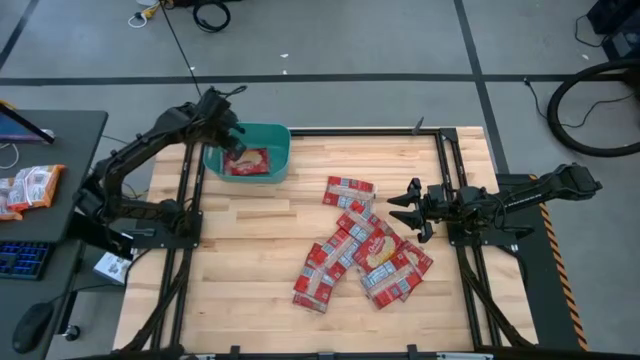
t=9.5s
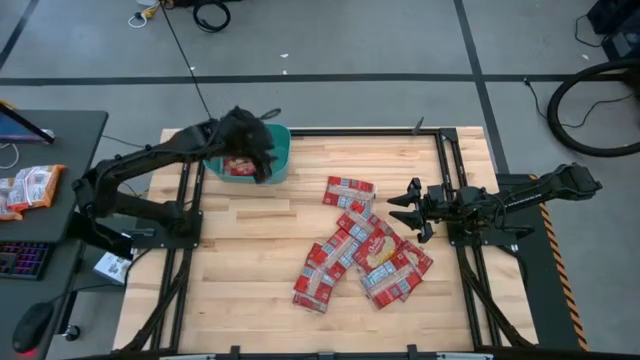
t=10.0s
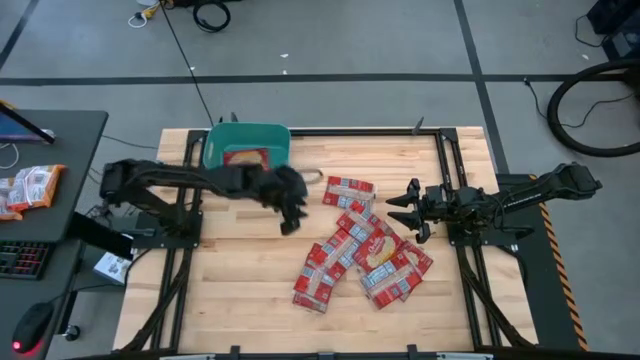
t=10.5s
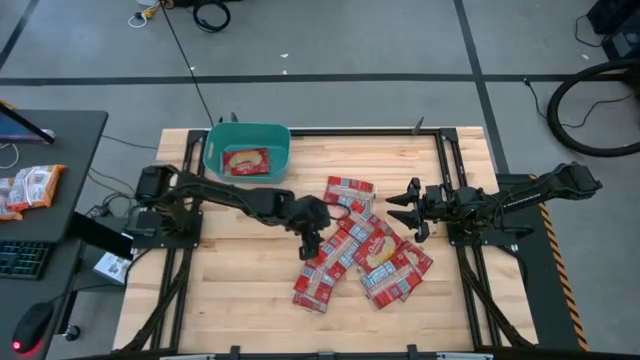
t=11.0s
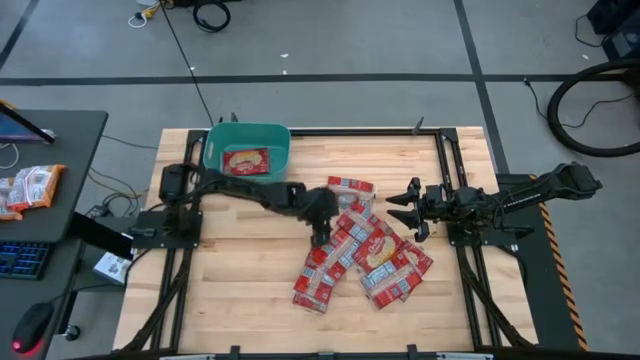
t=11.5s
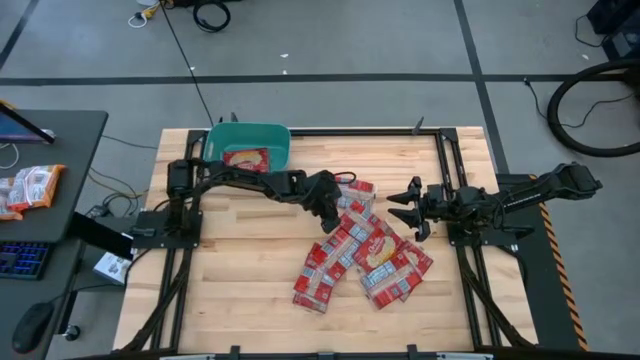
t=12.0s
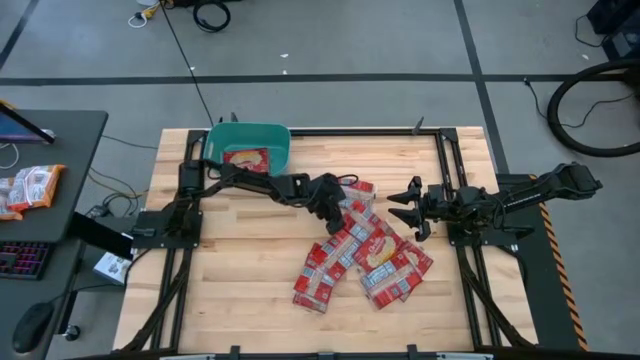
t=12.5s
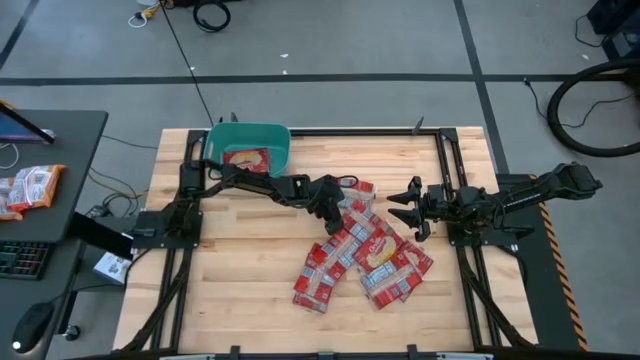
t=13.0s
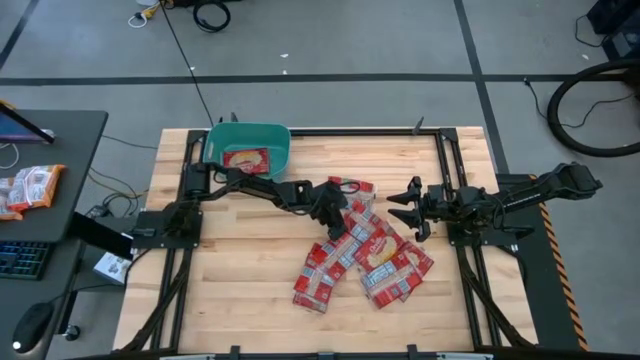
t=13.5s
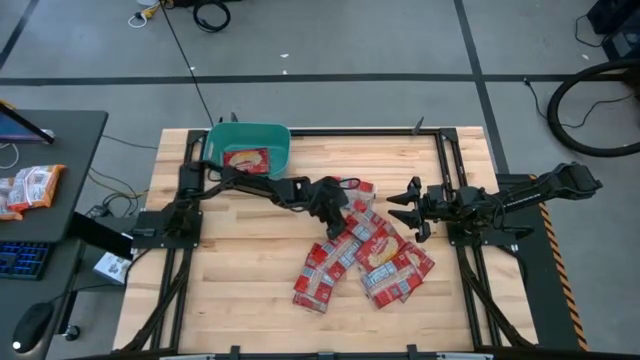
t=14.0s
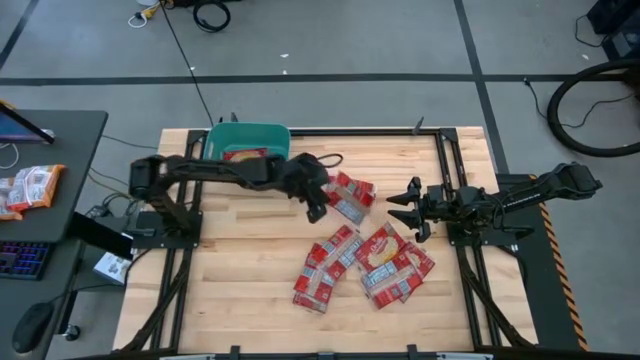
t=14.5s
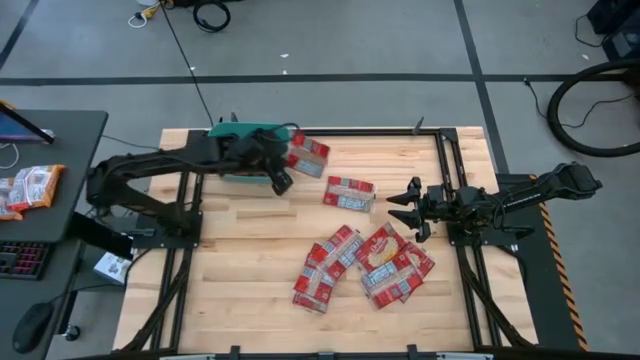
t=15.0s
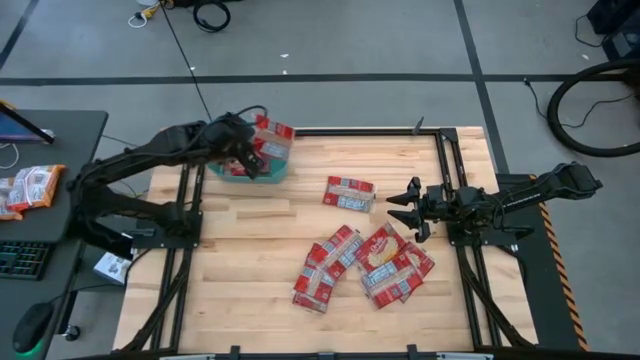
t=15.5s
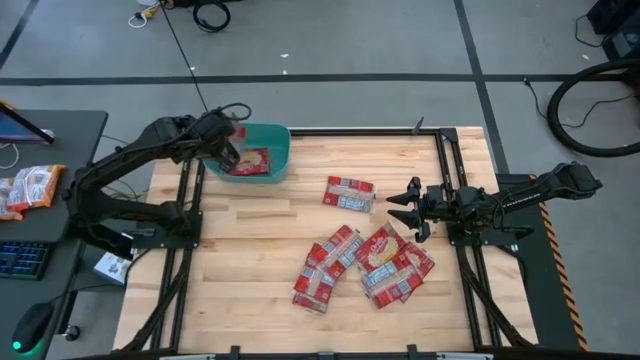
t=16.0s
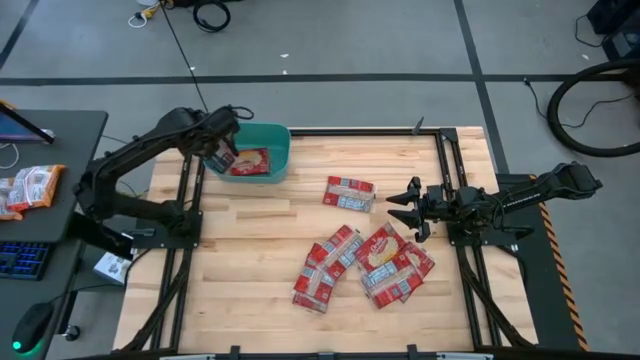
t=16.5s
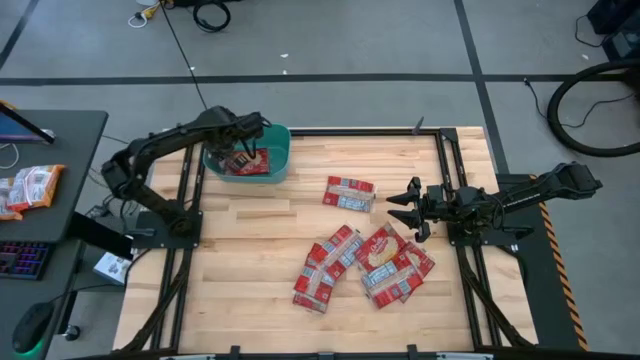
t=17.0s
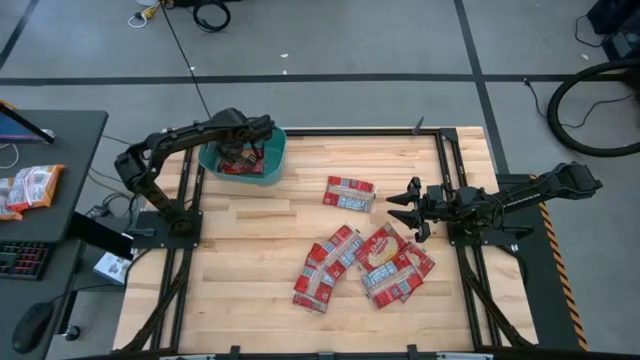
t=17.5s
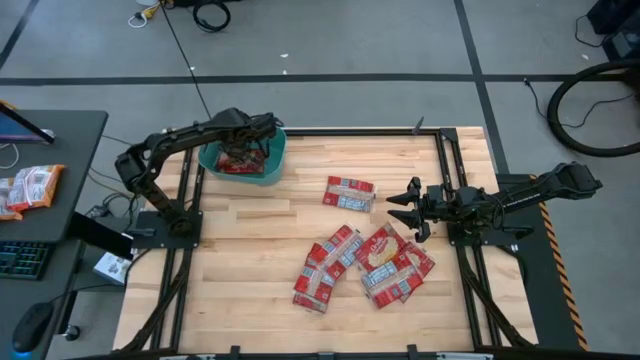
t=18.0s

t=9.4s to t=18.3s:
Task: Sort popcorn bags into baskets
Put the popcorn sachet into the bin

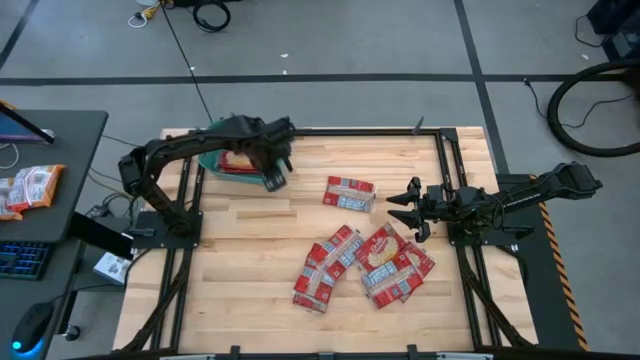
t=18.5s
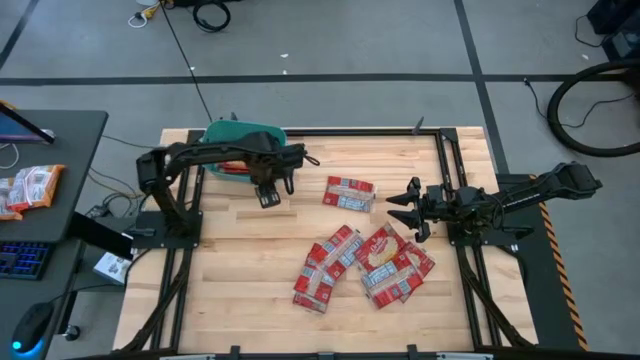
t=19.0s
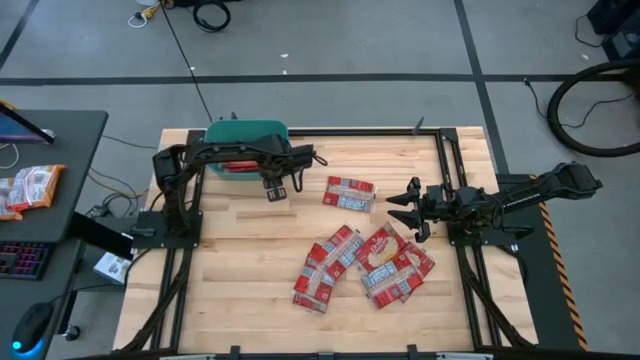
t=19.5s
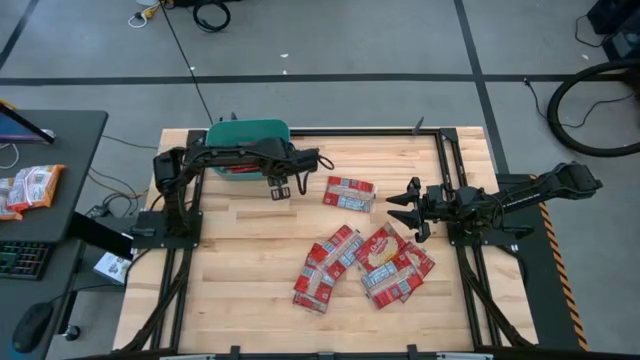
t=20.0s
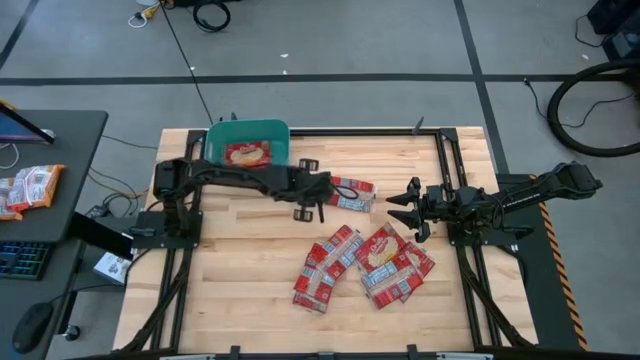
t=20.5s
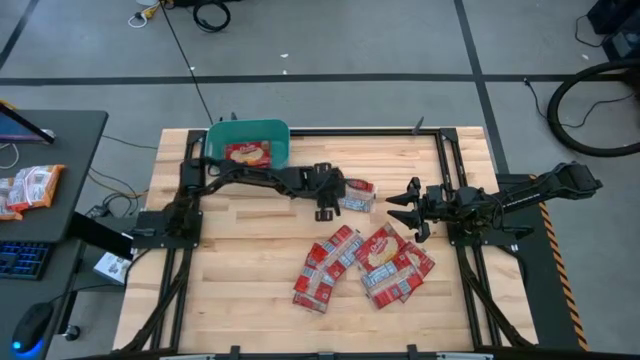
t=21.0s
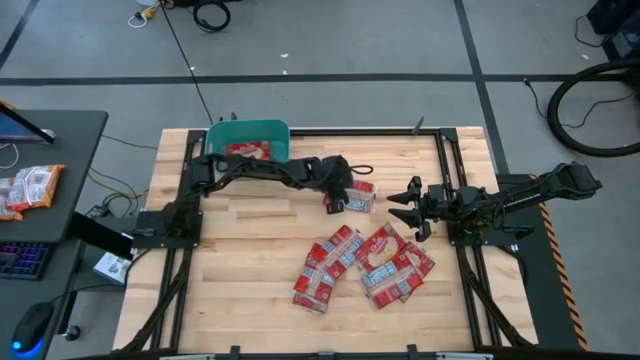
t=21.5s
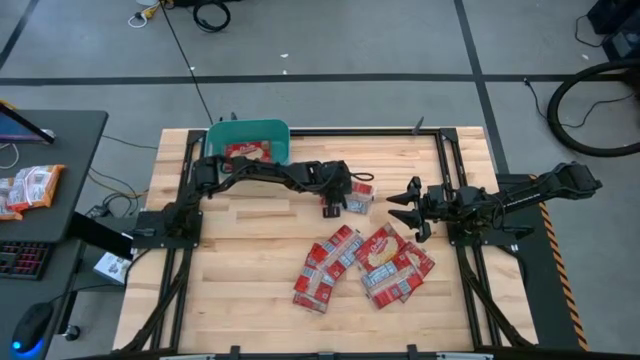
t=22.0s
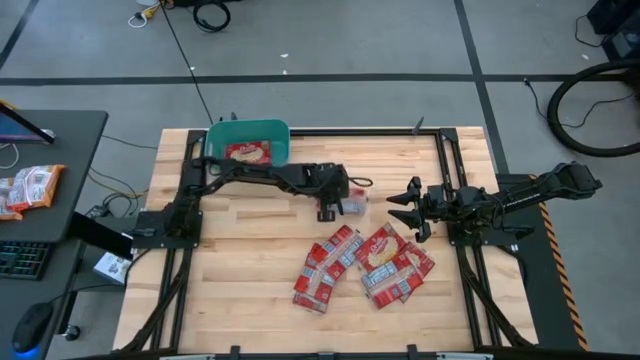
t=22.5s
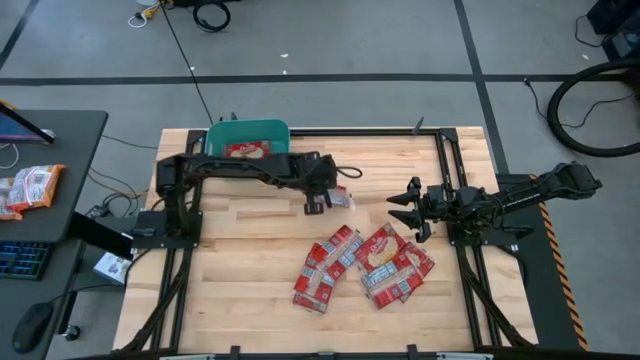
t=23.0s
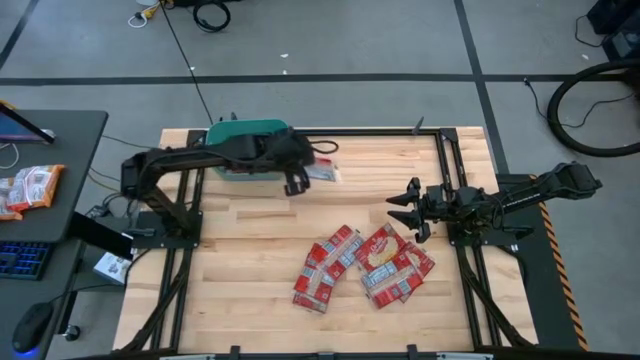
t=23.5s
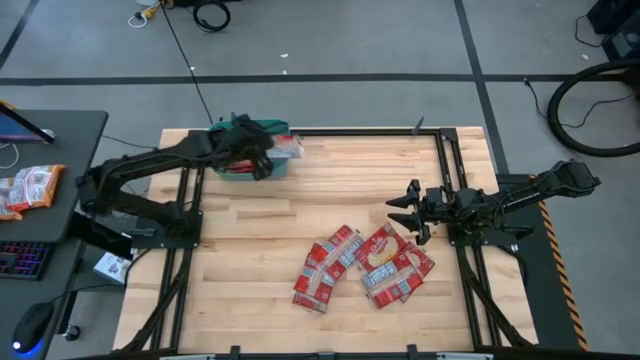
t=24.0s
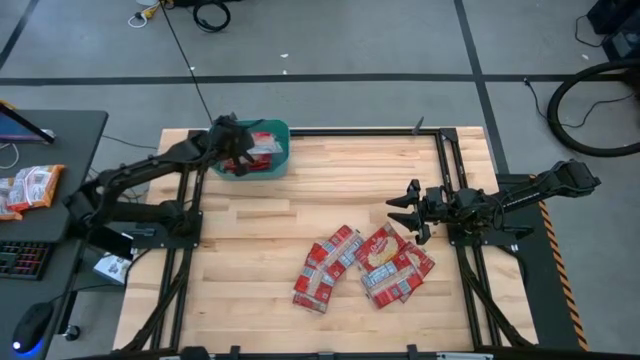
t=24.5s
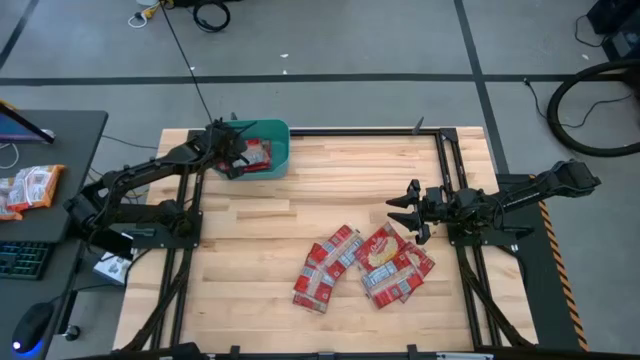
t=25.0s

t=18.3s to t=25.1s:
Put the popcorn sachet into the bin

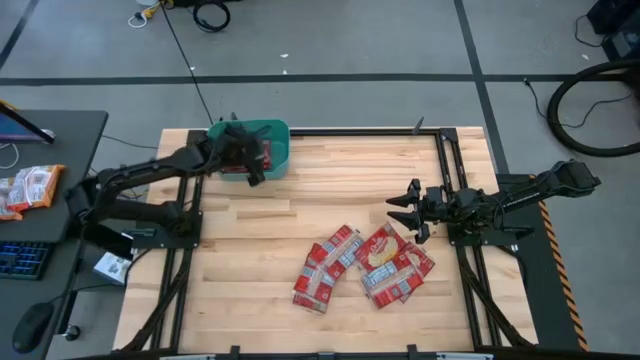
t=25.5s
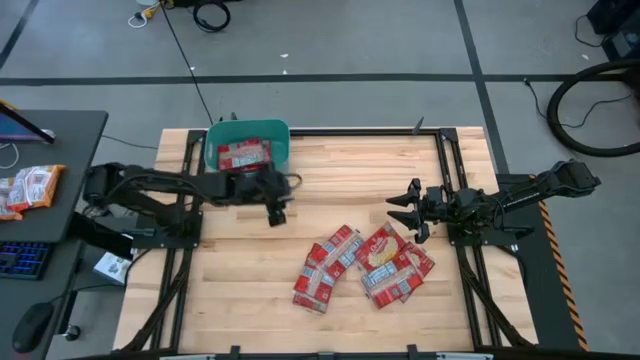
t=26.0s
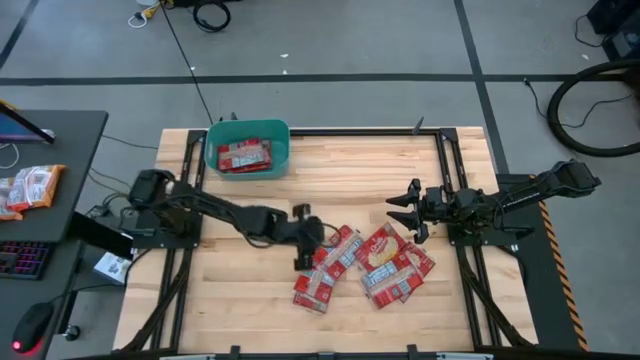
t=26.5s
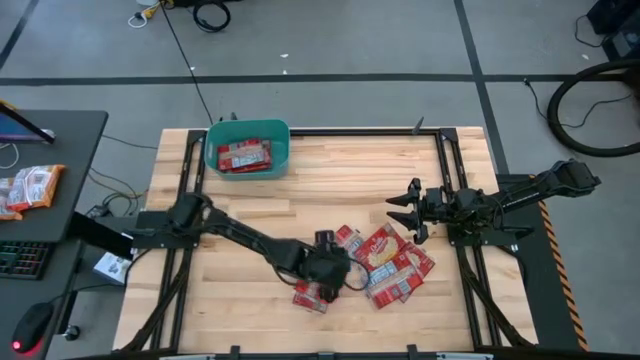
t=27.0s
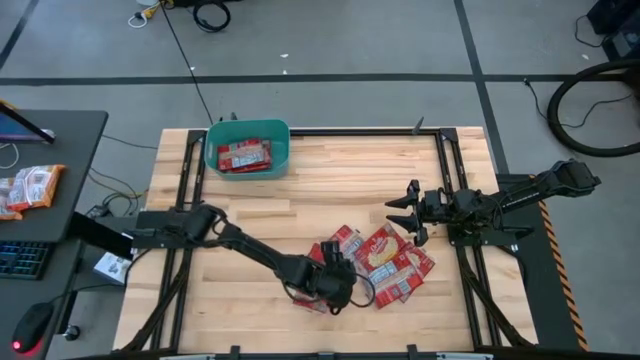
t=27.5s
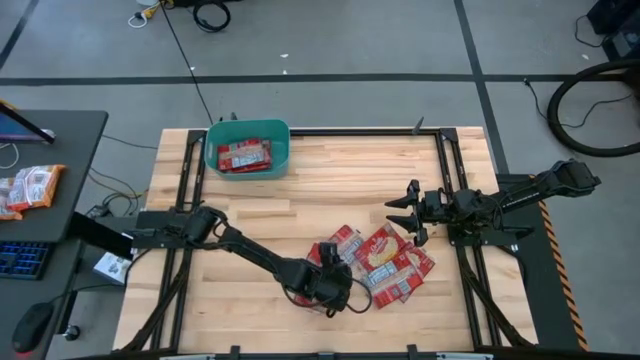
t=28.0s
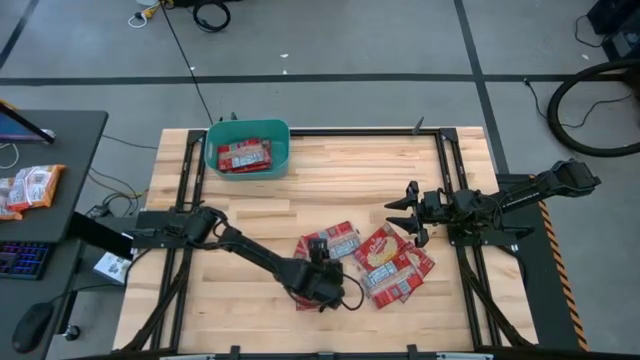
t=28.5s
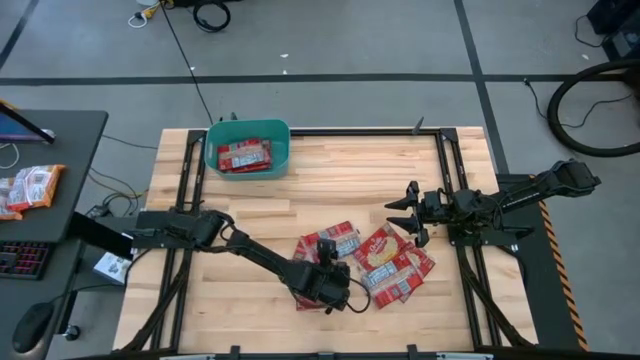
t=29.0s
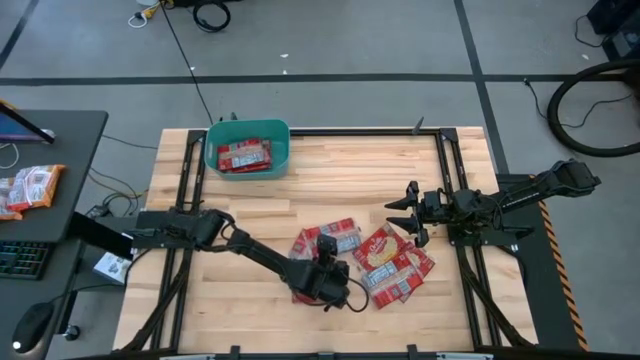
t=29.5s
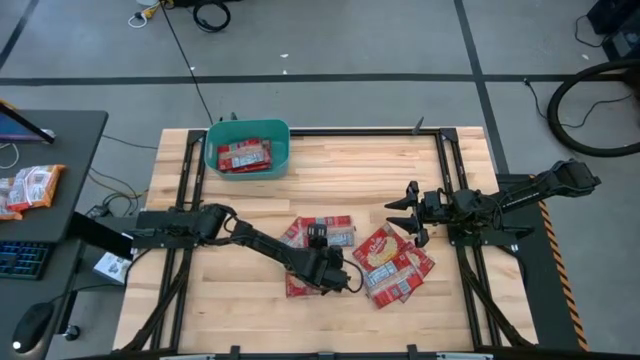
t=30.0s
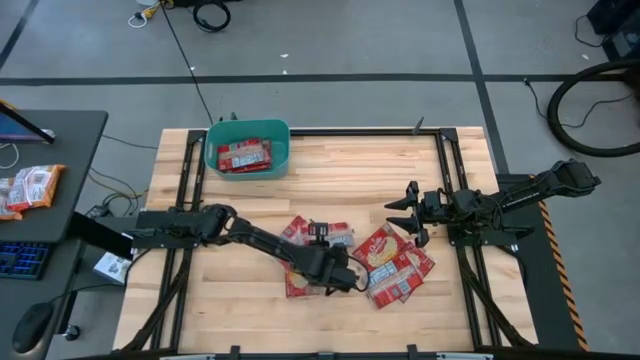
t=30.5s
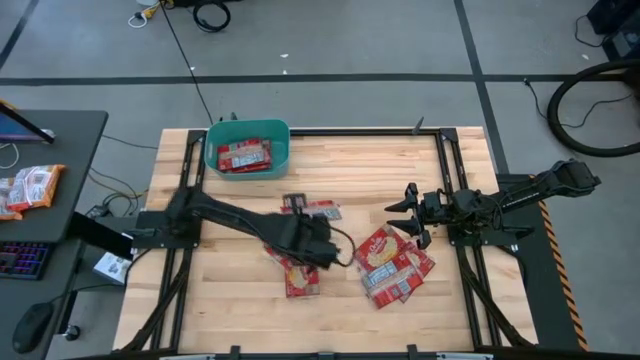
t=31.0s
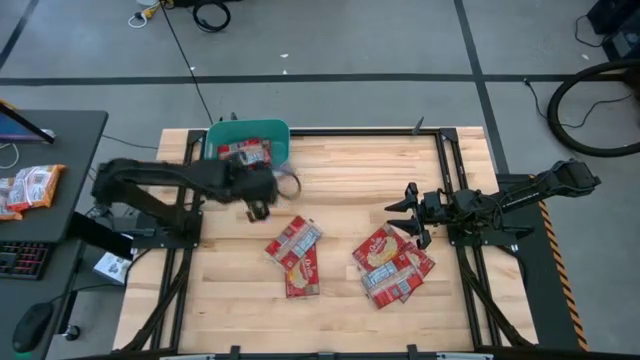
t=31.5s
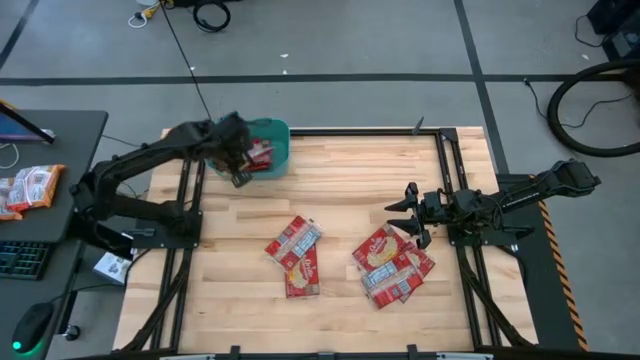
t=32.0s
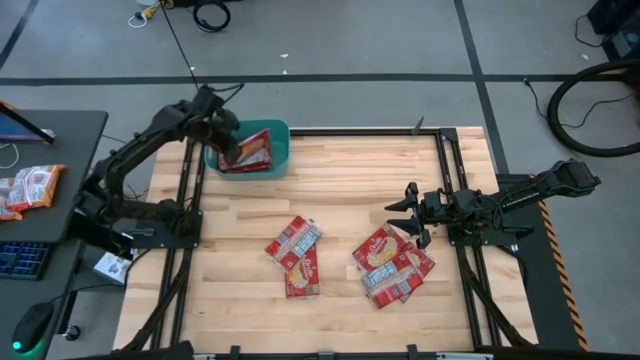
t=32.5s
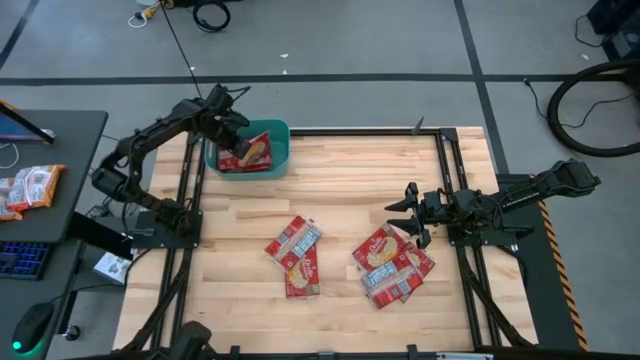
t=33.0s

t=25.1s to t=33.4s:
Put the popcorn sachet into the bin
